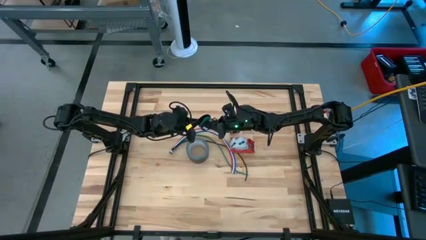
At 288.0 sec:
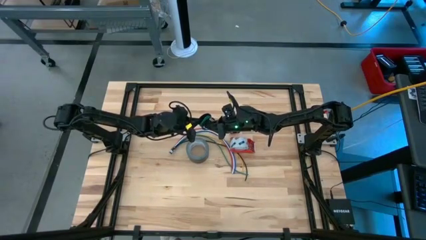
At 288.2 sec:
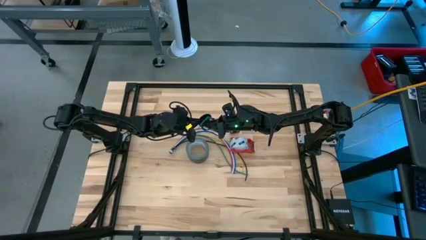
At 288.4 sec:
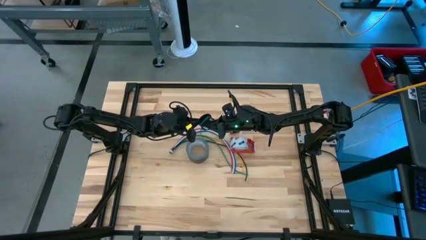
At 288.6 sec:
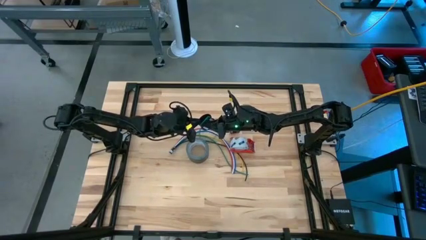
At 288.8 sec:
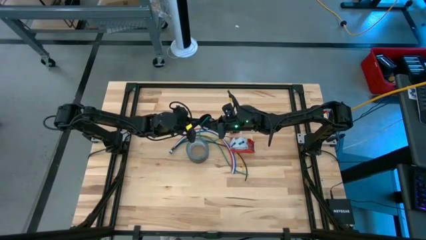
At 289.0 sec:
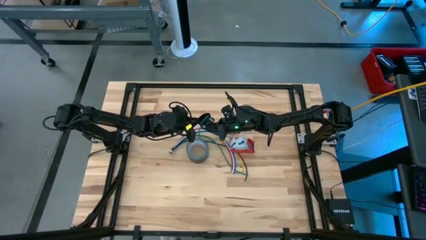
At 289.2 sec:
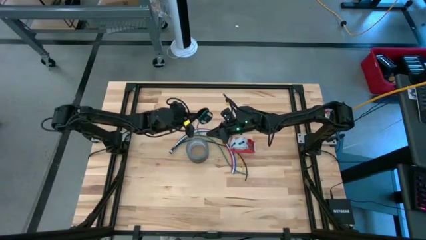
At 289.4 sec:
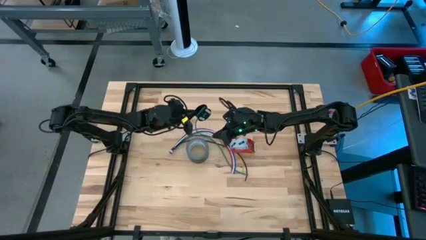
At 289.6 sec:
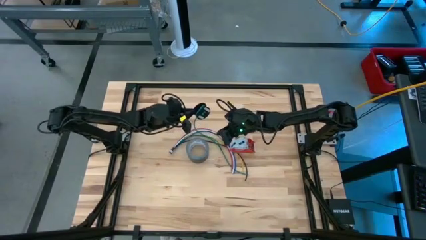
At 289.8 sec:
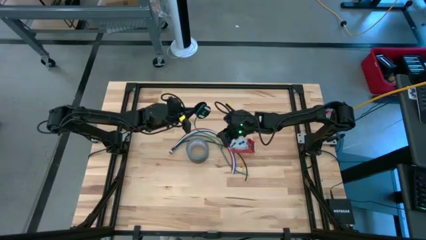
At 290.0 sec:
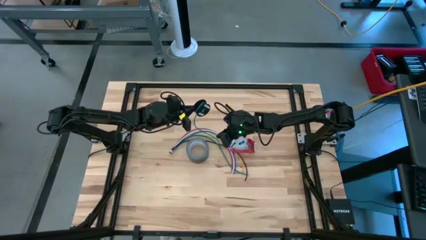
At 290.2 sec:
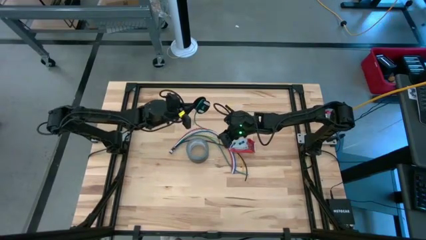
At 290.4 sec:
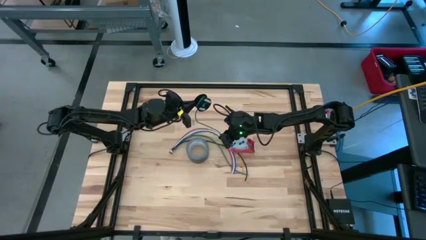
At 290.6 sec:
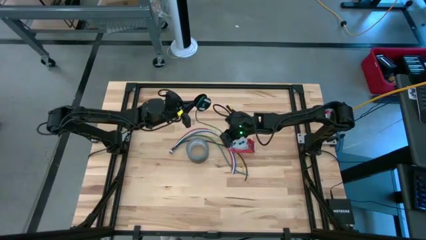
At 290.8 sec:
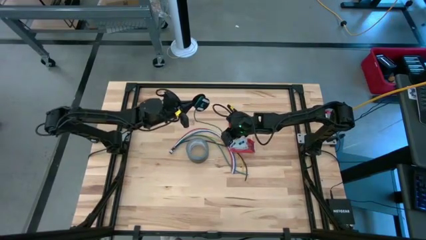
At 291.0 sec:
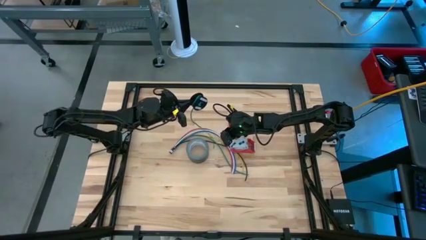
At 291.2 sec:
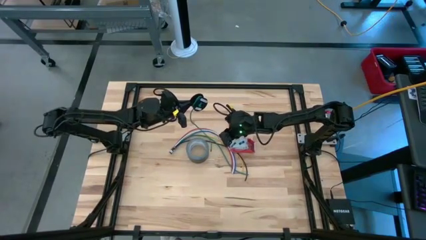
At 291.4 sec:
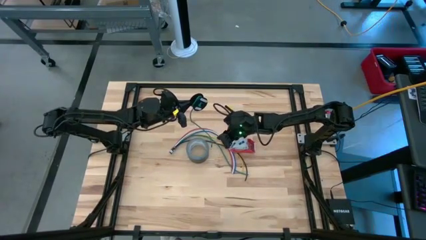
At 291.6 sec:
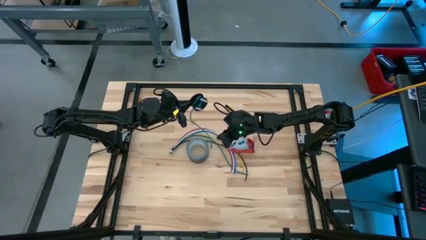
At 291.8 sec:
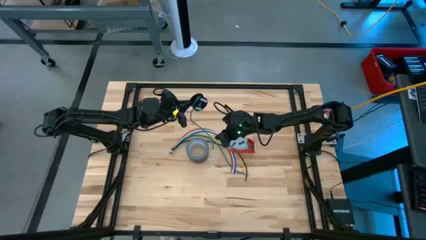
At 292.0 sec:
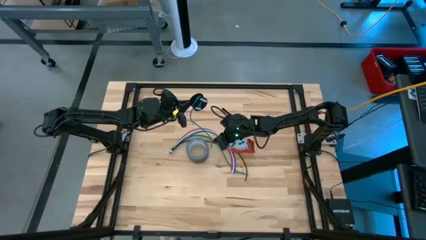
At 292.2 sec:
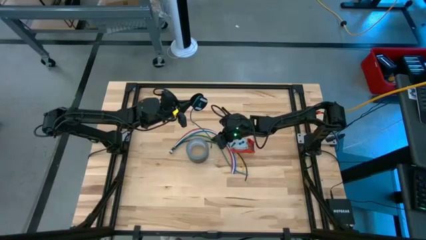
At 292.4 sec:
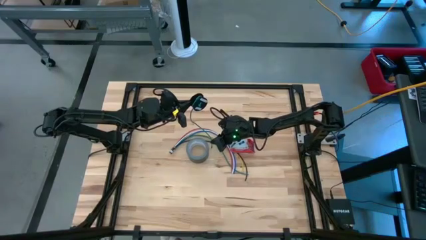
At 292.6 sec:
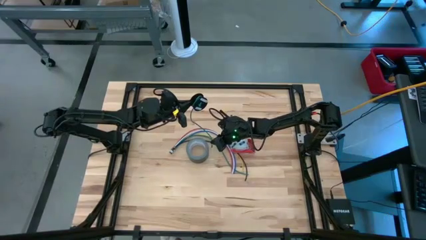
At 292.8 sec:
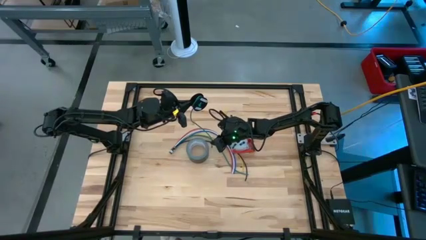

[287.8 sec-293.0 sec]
Task: Coil cords
Coil the green wire onto the black spool

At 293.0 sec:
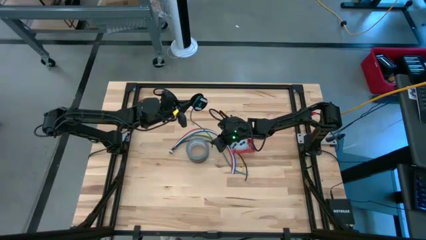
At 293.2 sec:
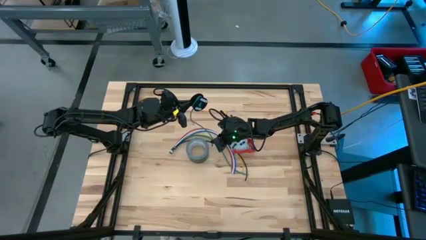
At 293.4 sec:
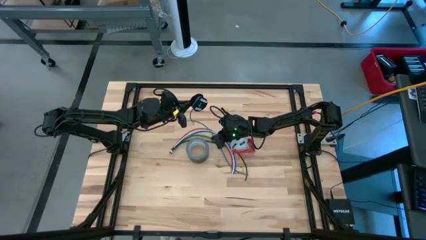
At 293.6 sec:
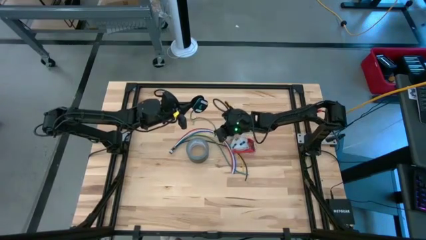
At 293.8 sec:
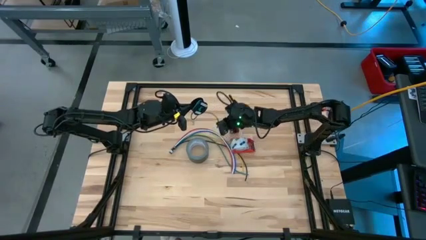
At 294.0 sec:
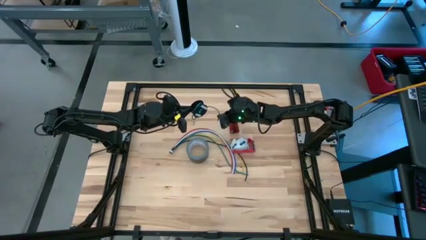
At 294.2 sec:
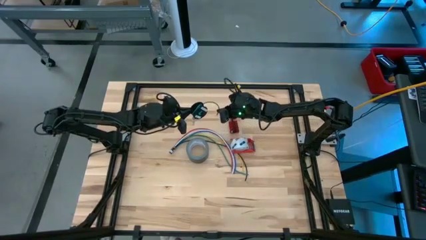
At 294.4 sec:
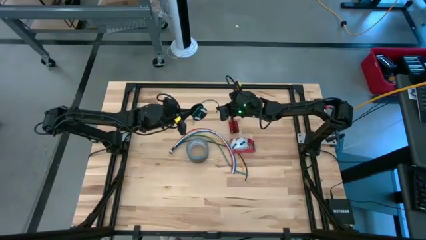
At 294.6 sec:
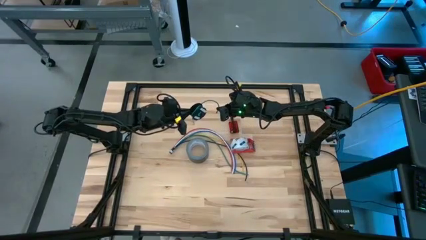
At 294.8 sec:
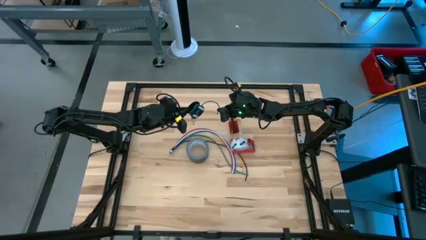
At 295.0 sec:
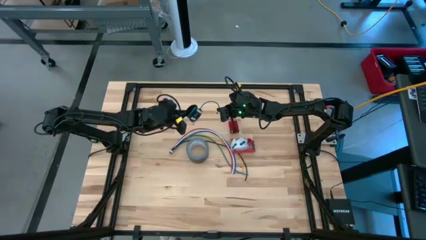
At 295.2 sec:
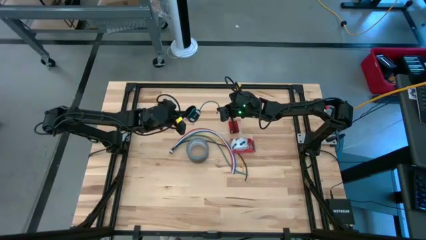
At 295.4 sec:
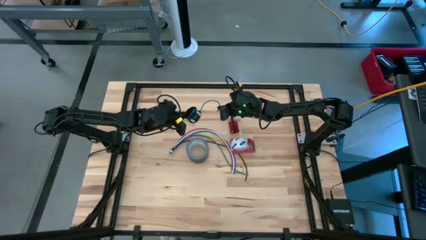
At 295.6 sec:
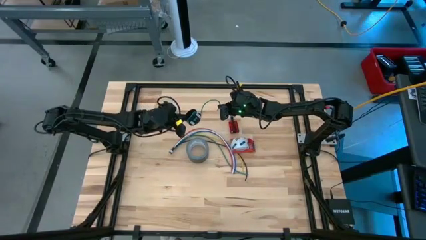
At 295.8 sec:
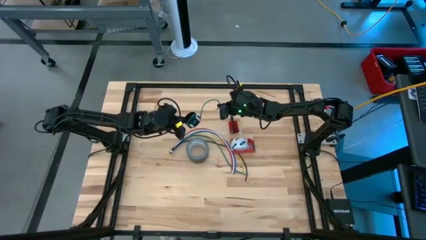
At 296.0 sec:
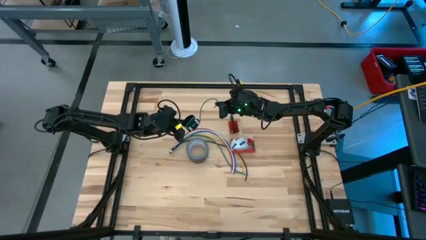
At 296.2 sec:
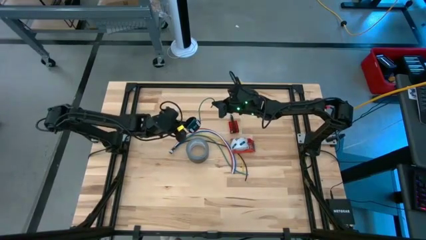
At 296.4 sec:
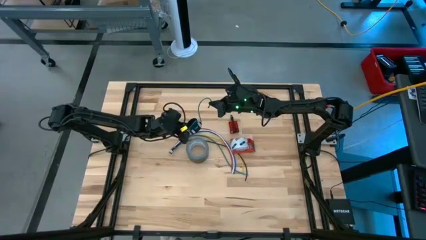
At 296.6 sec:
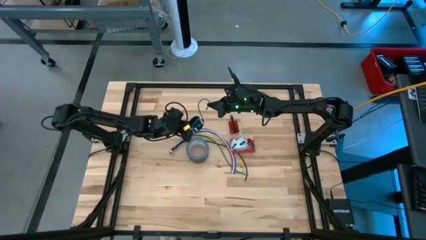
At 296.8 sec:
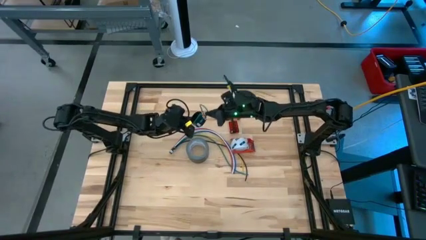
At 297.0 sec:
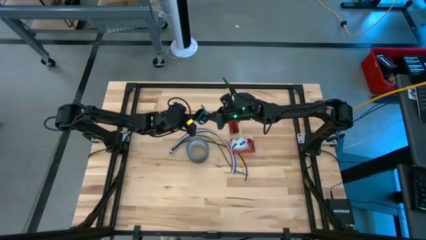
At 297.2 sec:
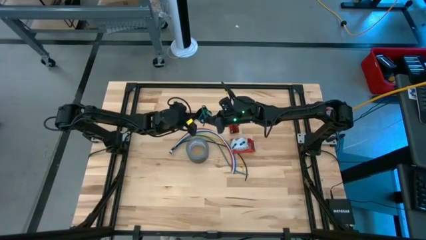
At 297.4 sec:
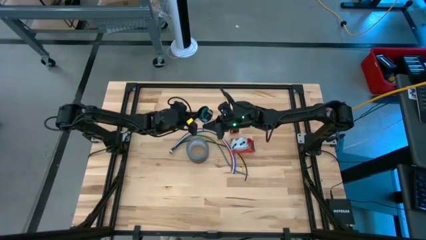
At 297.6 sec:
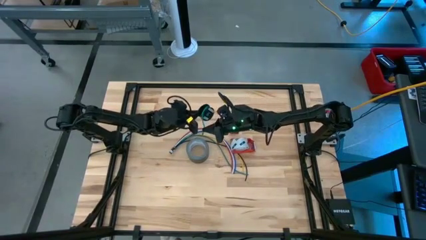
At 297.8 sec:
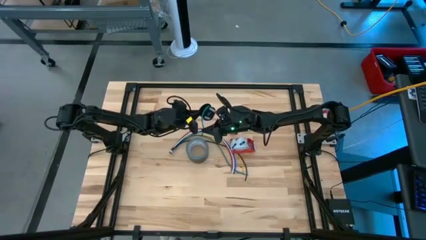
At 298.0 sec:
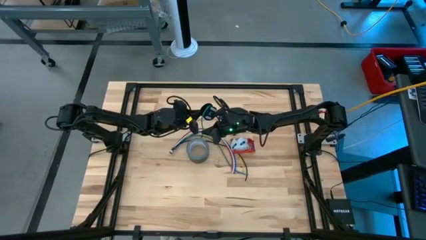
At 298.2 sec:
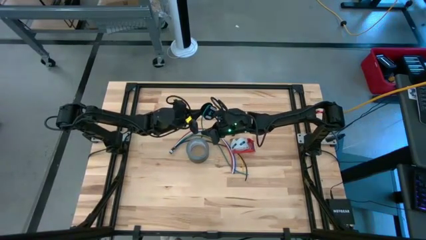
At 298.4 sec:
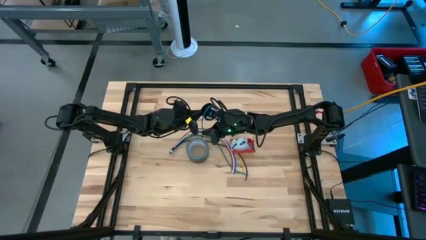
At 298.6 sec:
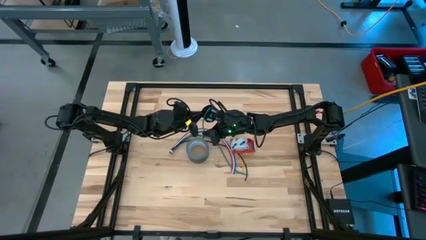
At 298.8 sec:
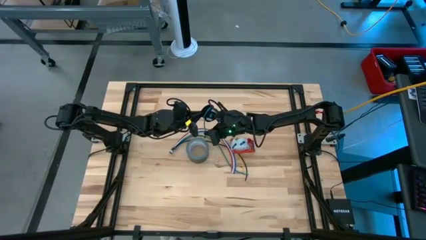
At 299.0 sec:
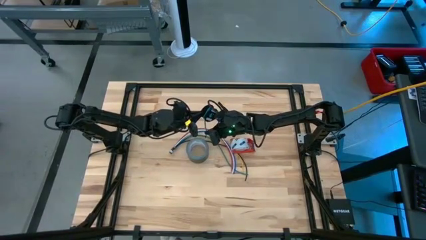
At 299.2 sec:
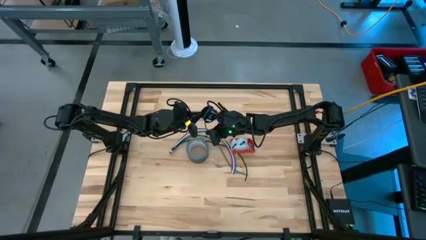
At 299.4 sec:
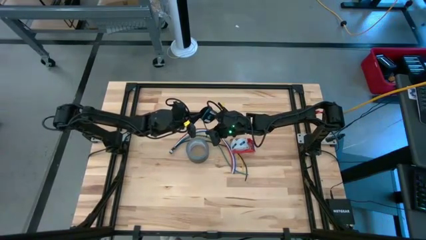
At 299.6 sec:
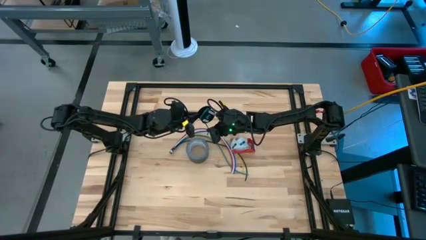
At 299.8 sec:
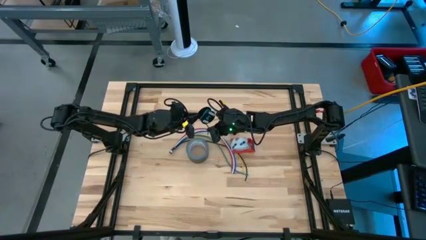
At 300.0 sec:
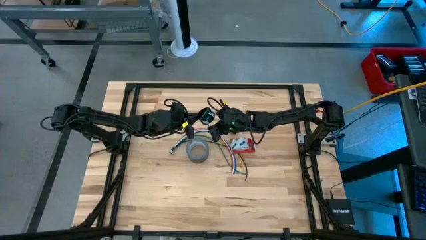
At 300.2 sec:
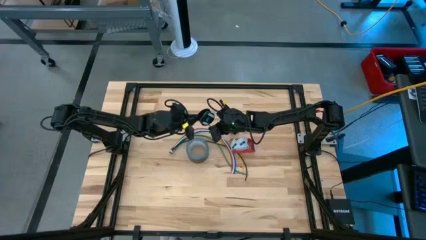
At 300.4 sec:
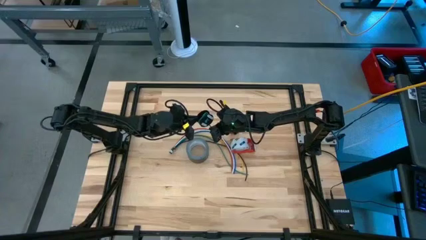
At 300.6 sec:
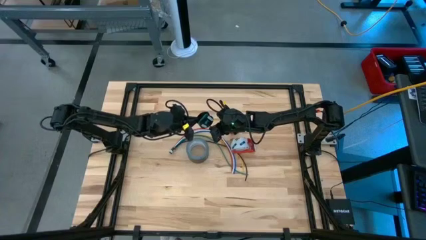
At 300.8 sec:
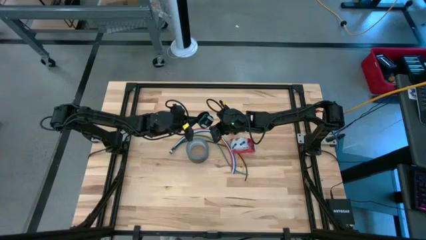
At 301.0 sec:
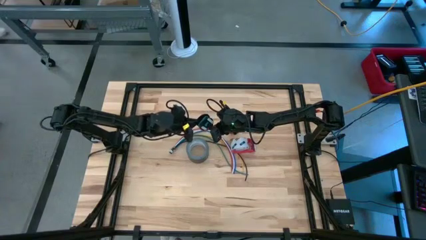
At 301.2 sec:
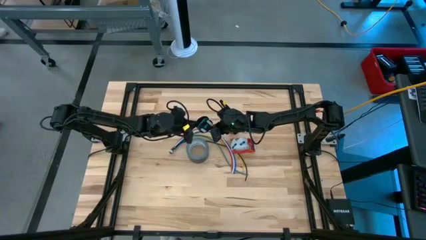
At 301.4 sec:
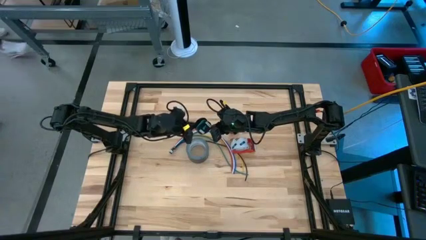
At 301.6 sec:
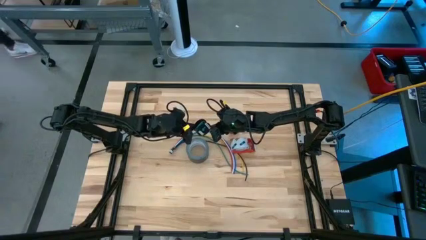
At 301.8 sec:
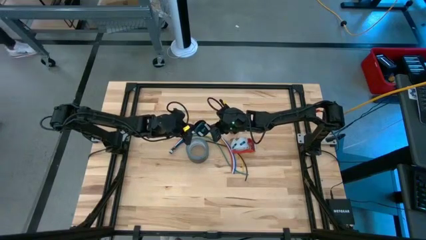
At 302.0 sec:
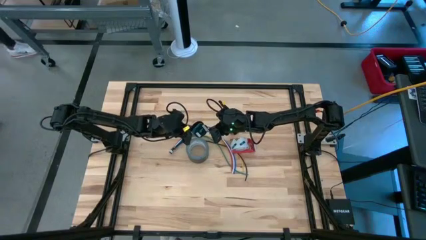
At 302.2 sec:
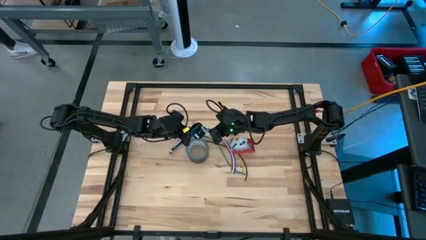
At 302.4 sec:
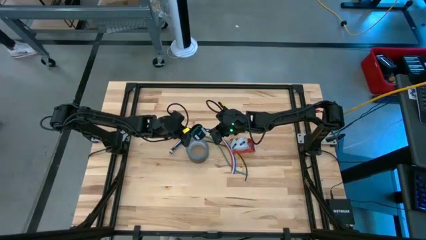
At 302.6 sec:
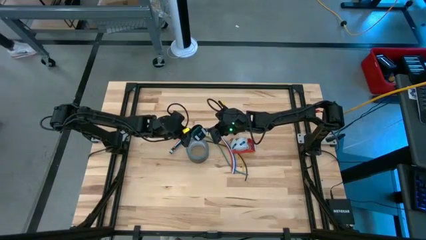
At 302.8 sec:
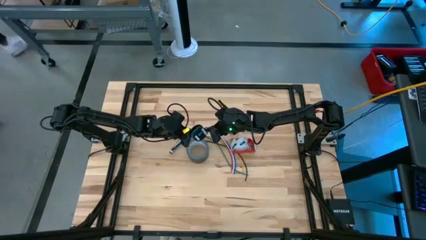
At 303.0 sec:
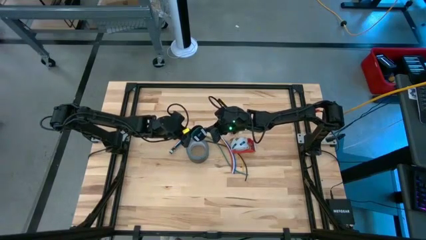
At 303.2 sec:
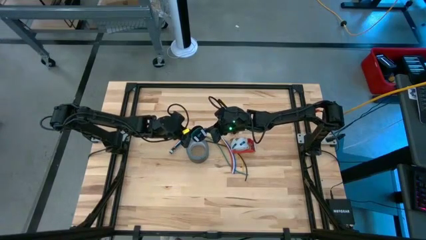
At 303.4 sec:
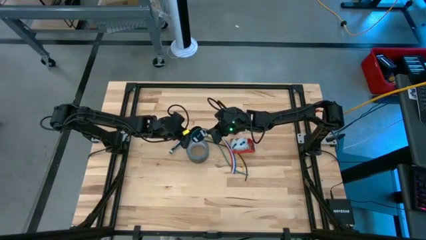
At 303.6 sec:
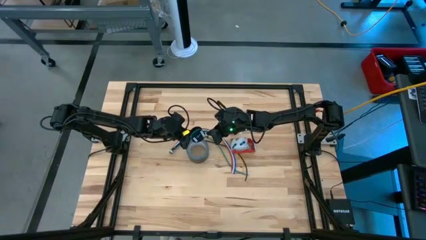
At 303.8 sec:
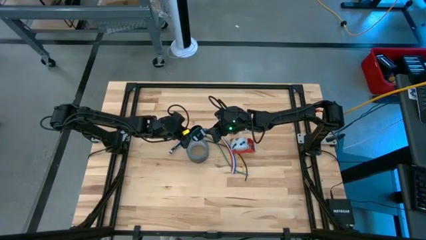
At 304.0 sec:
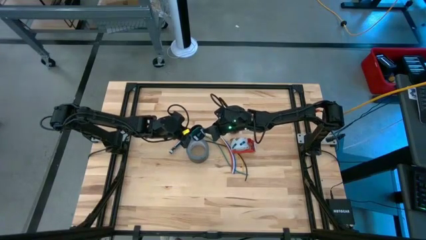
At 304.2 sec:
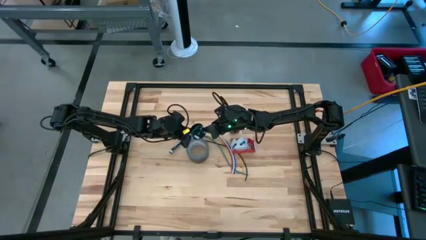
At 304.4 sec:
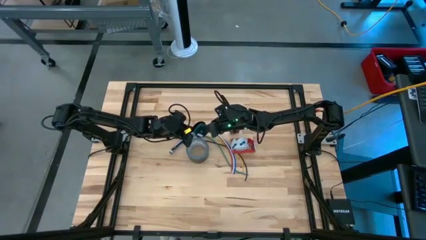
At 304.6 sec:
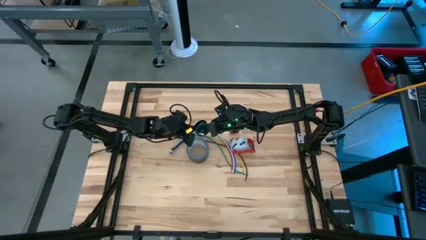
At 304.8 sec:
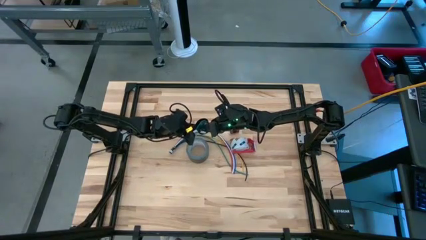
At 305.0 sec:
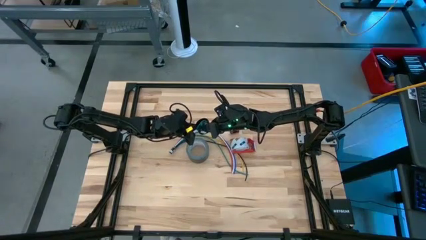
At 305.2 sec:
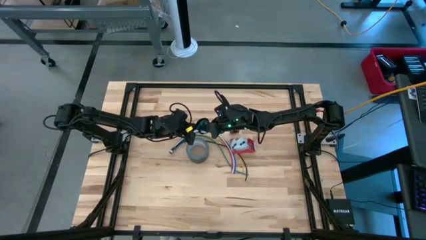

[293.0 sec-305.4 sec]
Coil the green wire onto the black spool
